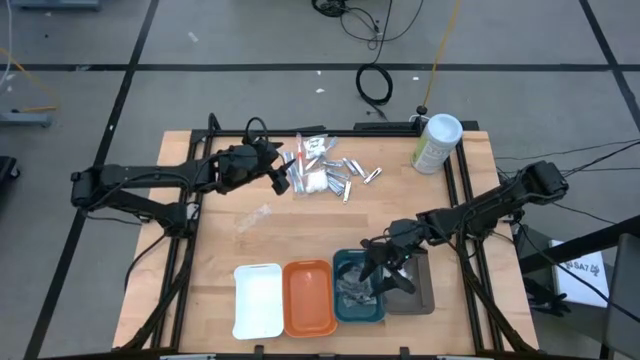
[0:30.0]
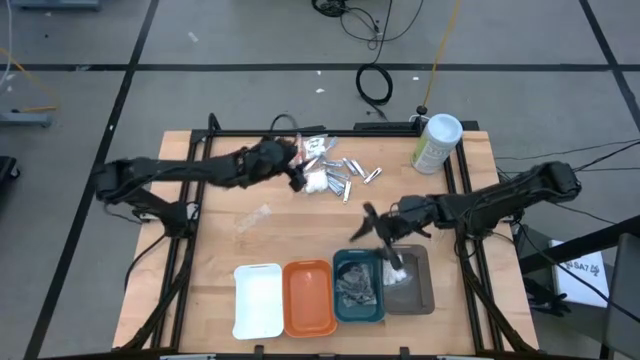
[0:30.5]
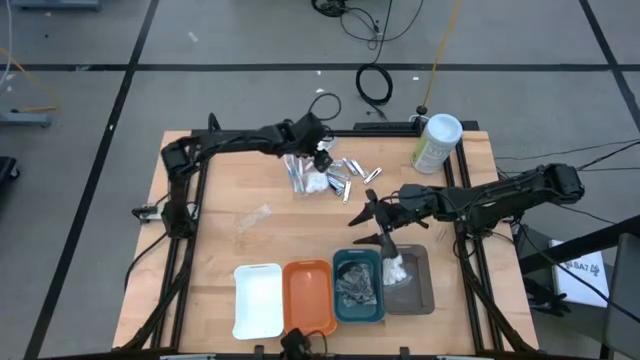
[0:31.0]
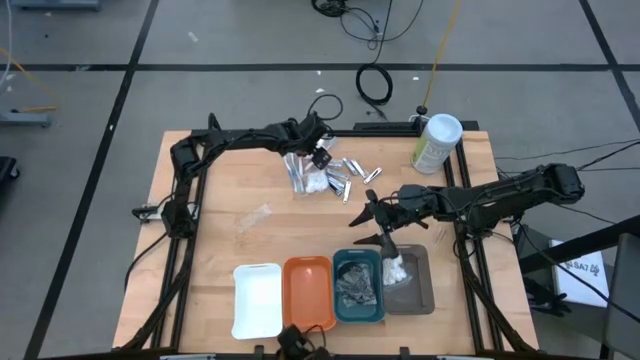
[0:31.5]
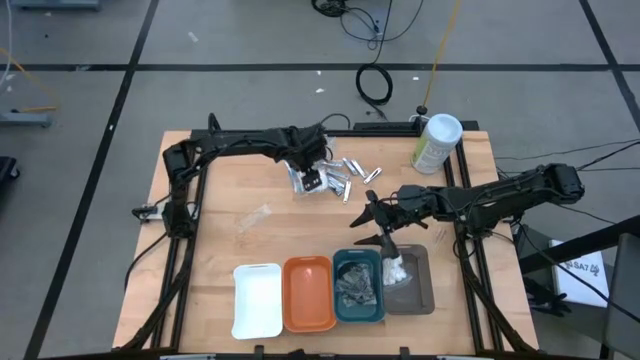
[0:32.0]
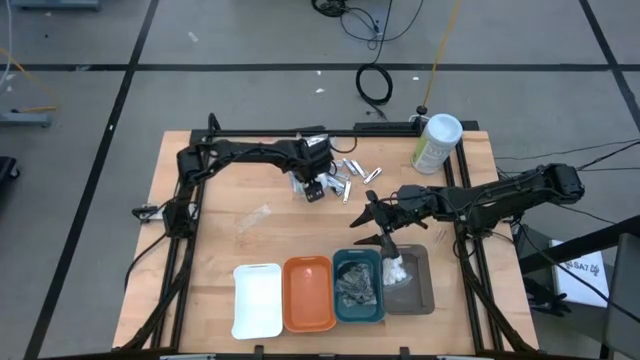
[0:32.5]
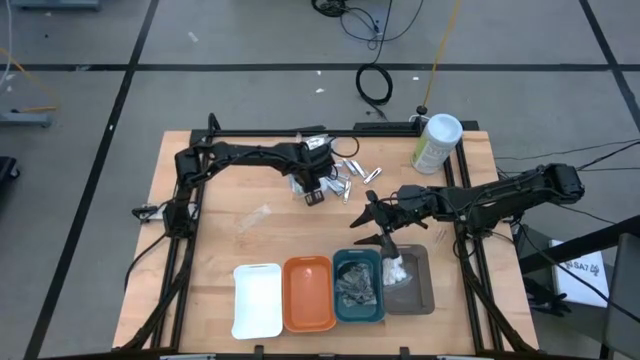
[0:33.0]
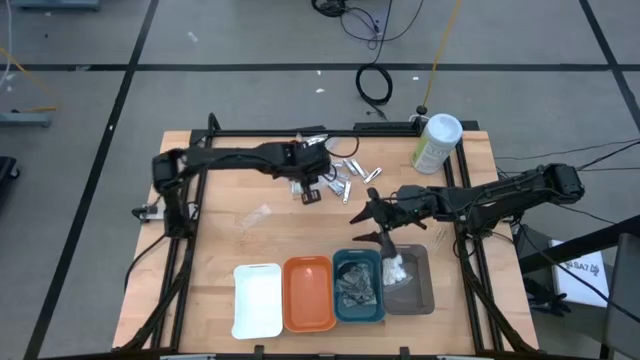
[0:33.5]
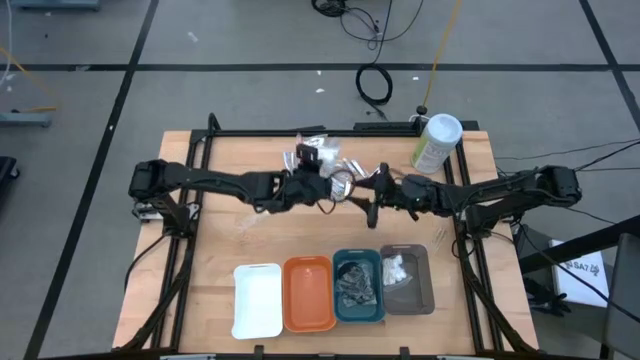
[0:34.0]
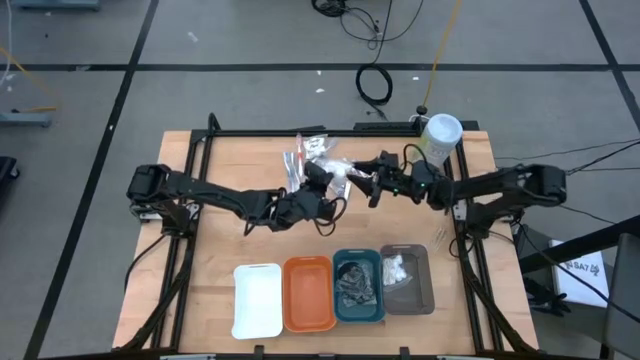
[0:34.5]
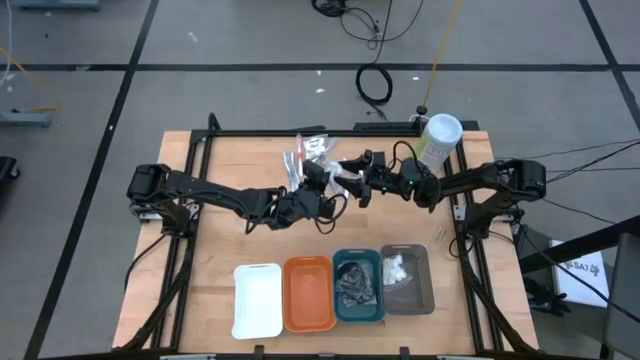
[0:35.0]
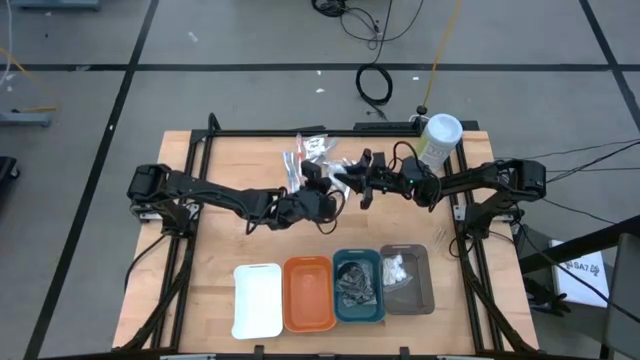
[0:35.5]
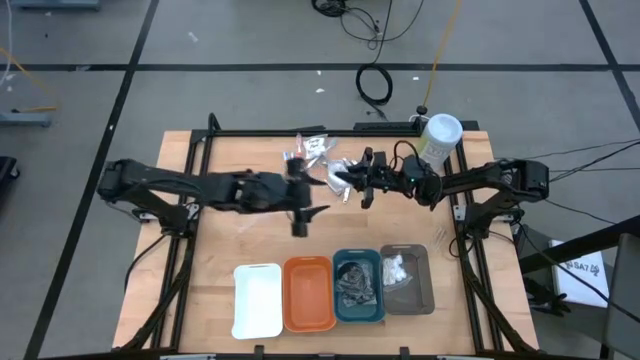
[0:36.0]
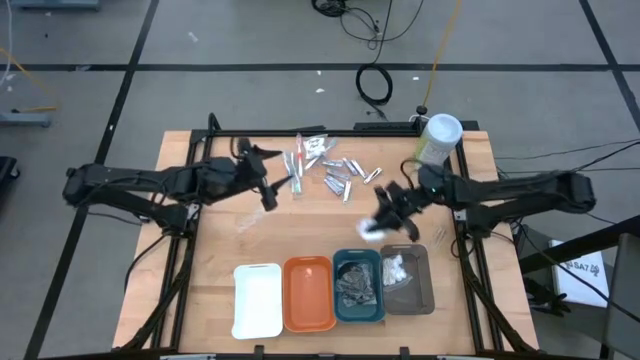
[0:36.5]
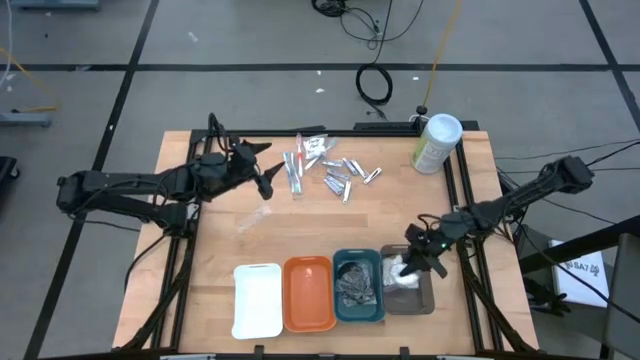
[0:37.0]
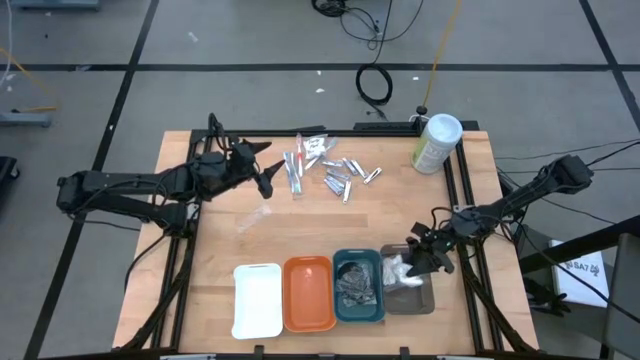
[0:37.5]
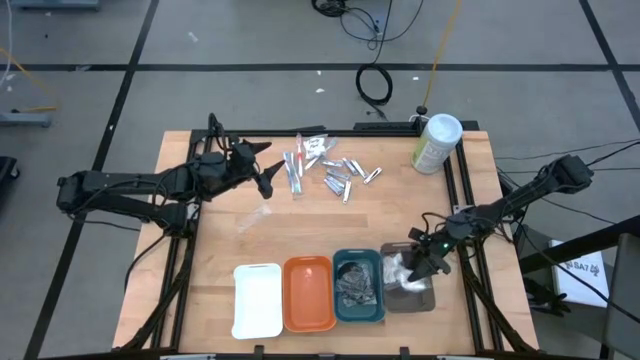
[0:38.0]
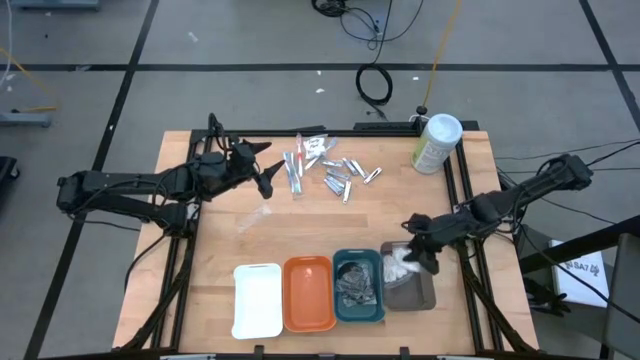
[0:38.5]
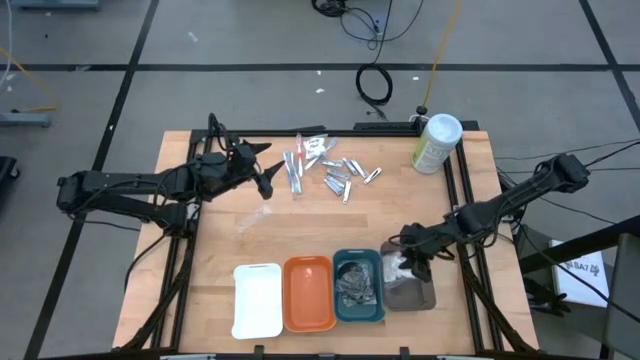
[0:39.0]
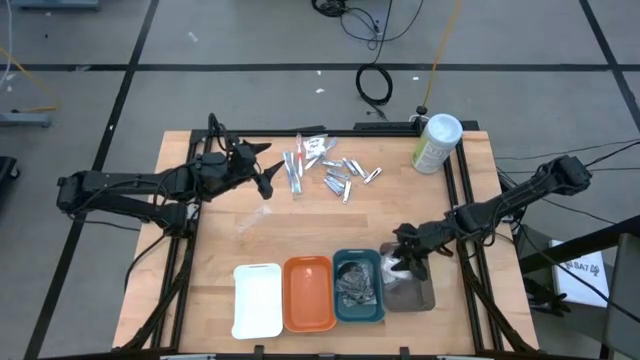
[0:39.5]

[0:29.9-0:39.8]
Task: Pick & Place Travel size toiletries
Put the white cotton pack into the black bin

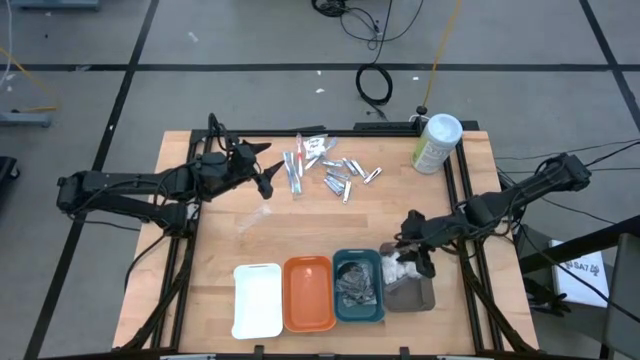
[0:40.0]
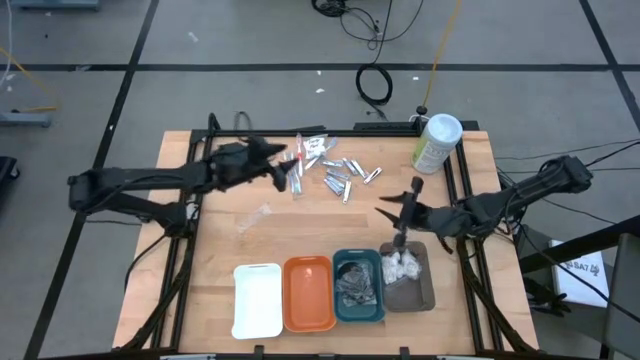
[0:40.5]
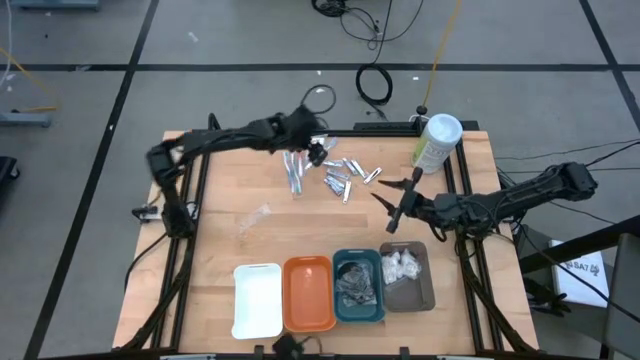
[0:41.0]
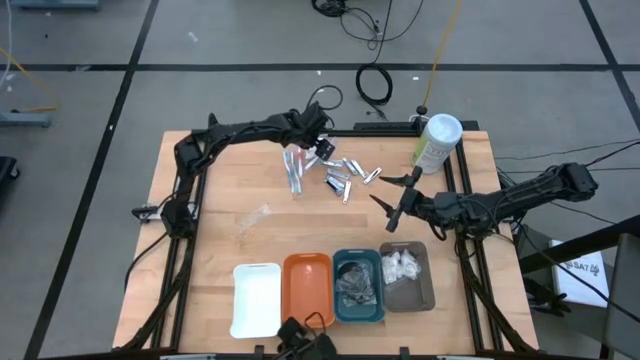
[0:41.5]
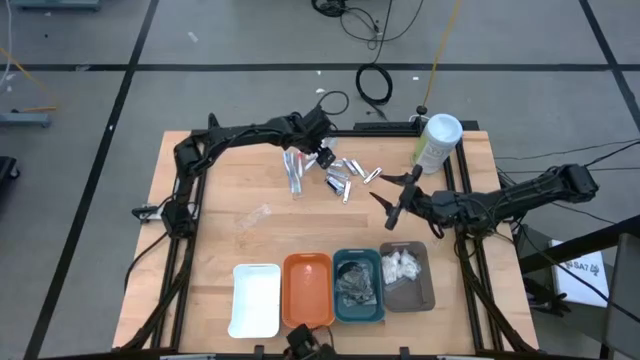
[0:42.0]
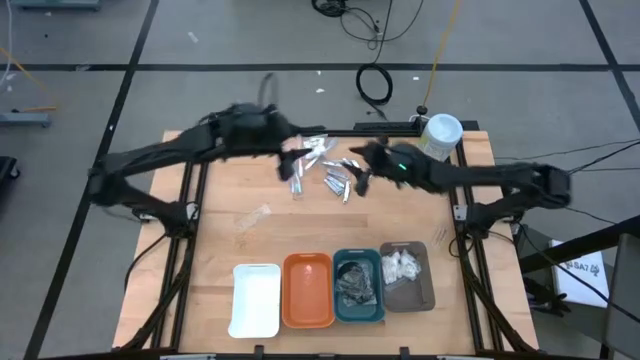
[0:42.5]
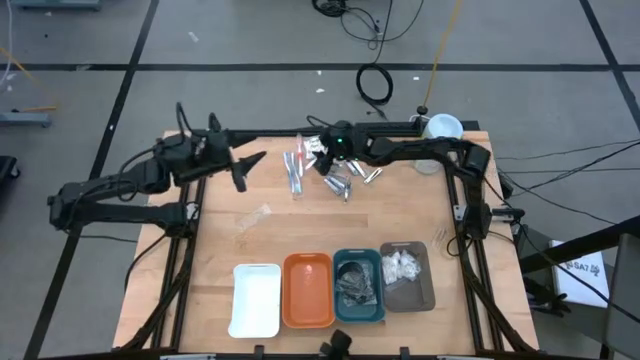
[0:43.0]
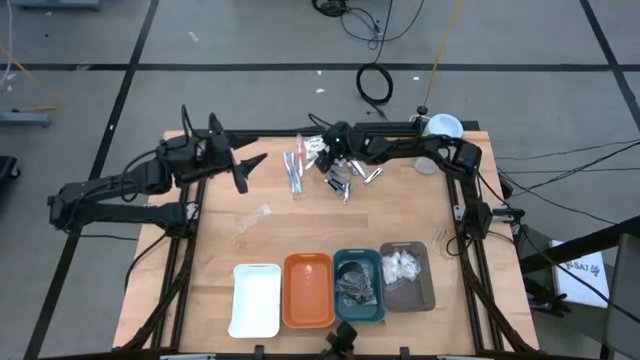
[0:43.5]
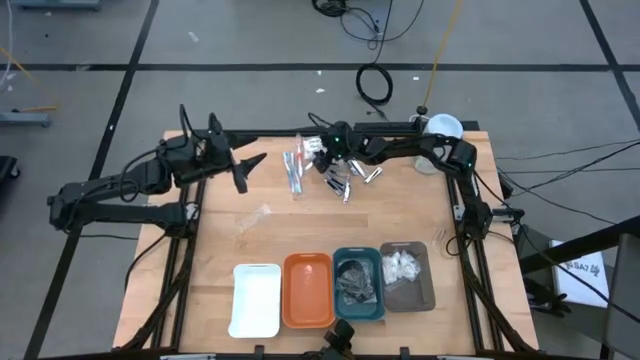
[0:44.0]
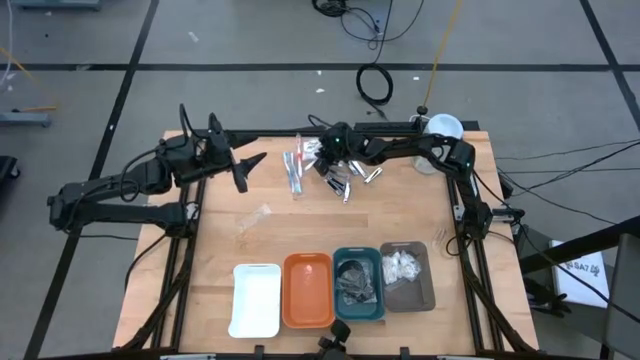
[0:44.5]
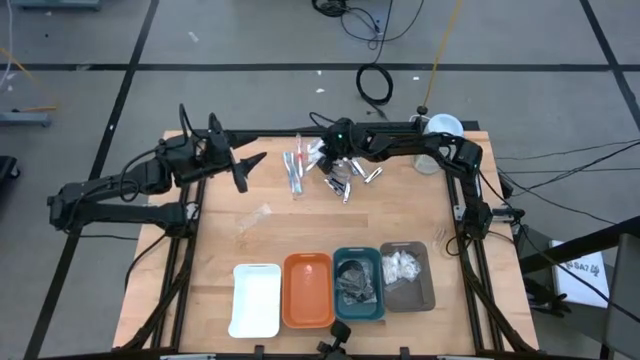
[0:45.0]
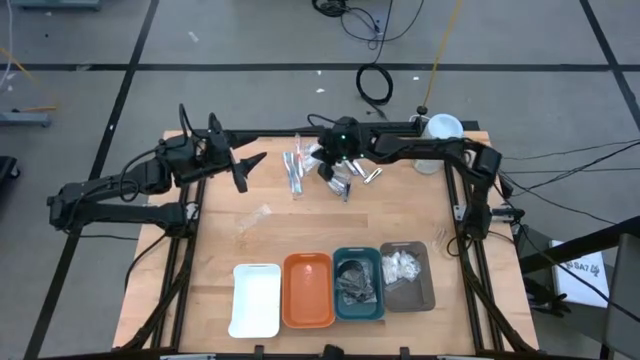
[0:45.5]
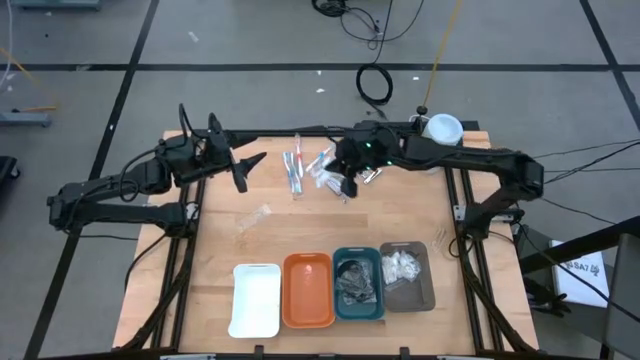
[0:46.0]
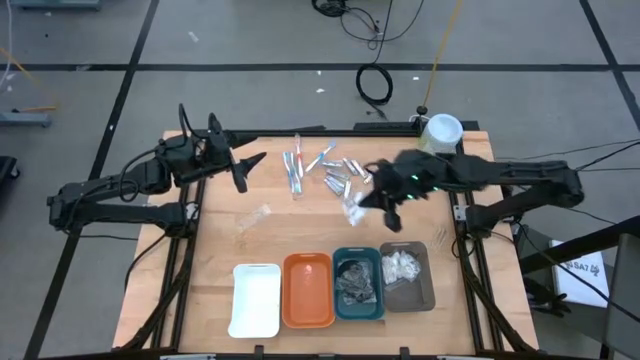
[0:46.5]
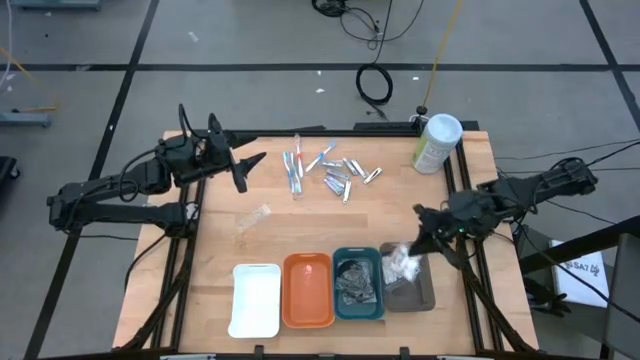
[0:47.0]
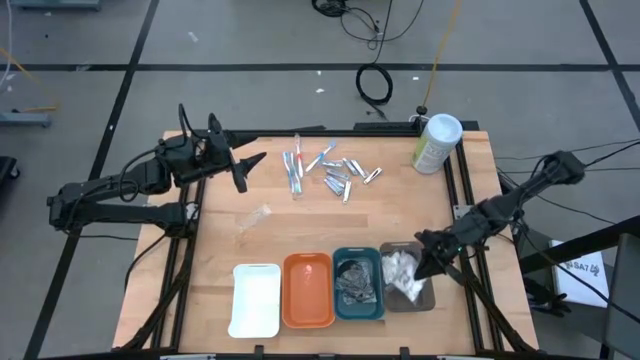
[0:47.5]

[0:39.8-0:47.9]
Put the white cotton pack into the black bin

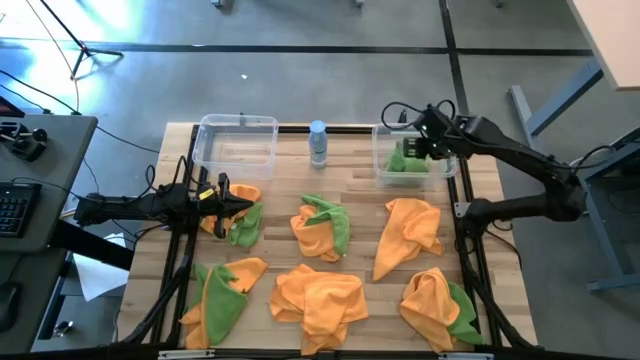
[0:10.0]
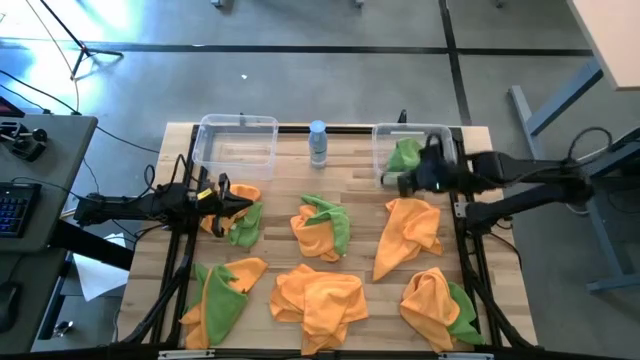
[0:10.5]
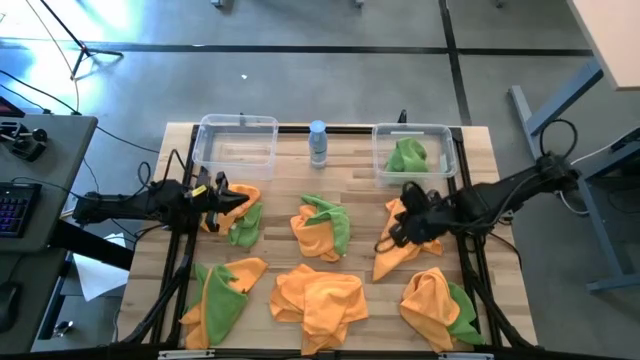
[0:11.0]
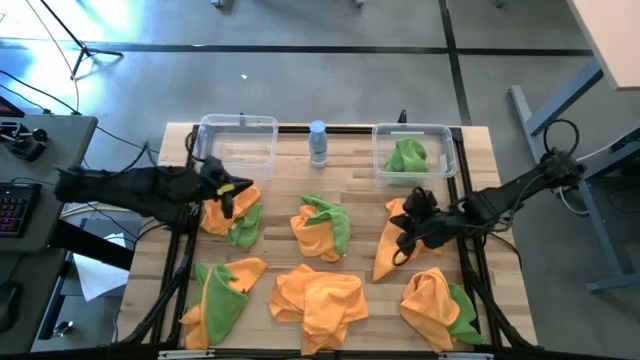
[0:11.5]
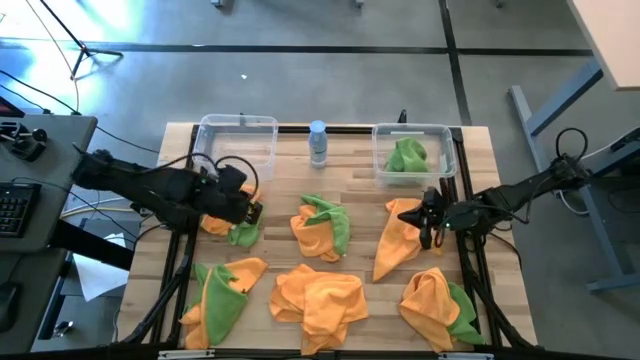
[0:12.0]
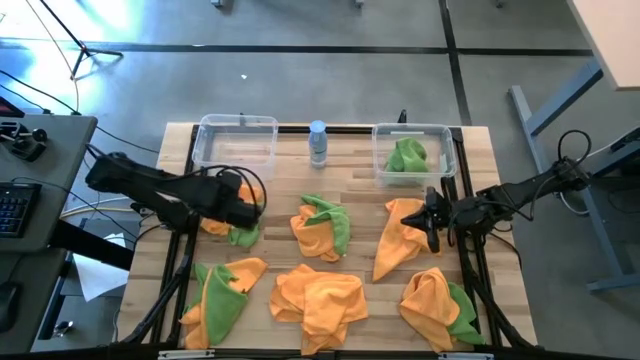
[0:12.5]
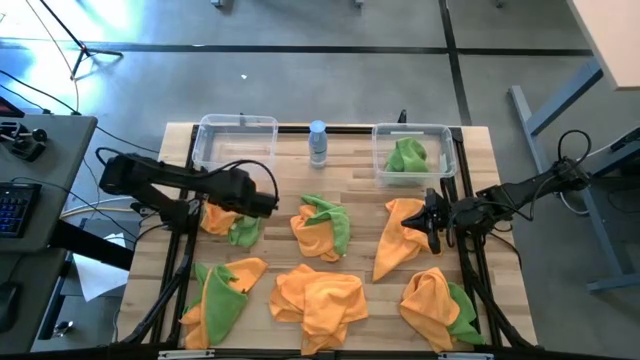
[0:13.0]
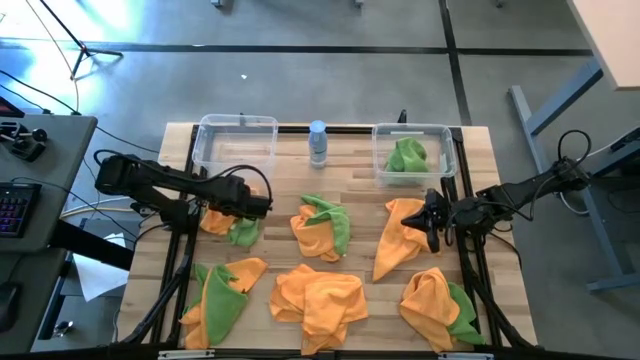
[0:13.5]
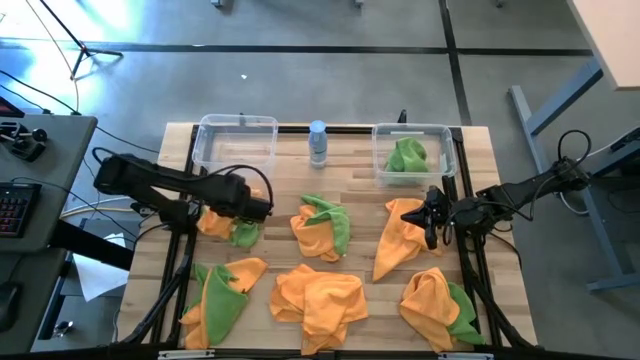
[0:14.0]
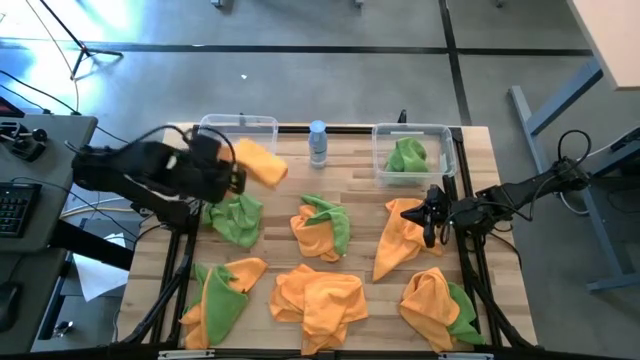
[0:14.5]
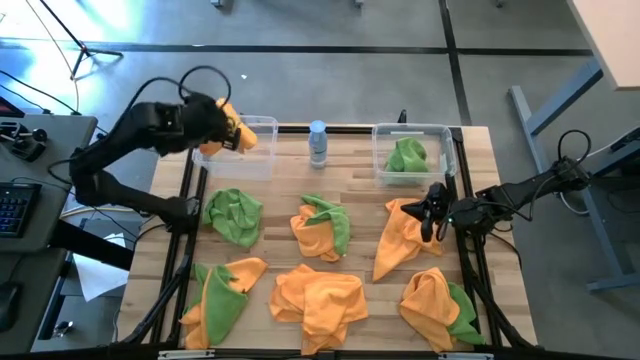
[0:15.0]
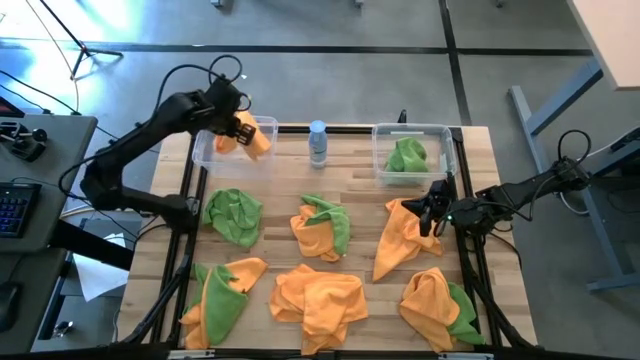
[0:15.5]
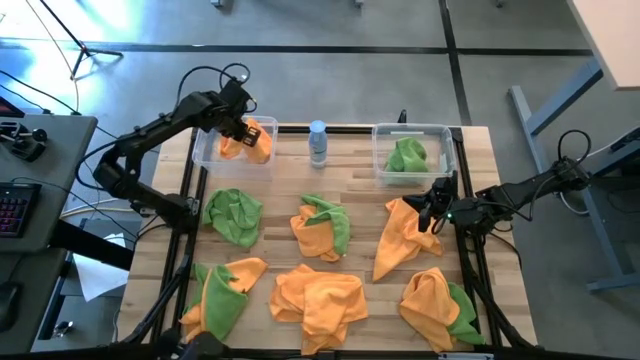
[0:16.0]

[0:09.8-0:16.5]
Task: Sort microfiber towel by color & place in baskets
Put the orange towel into the left transparent bin
